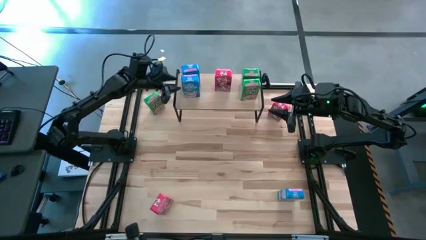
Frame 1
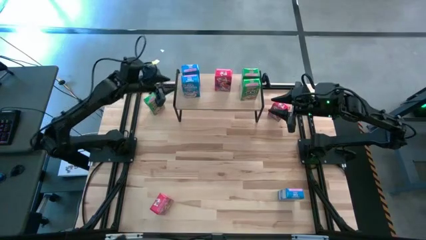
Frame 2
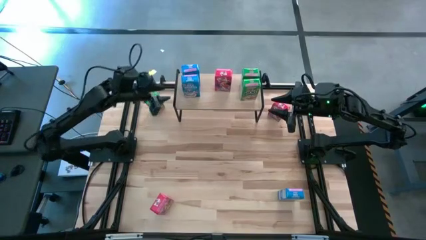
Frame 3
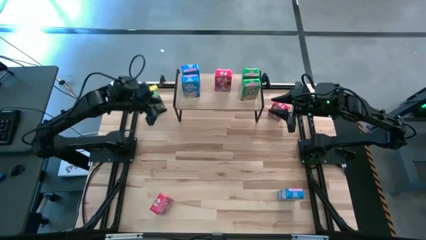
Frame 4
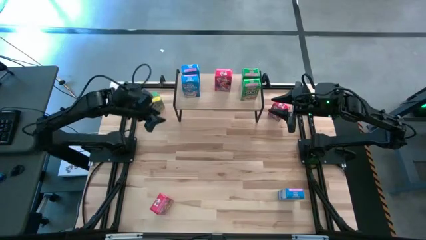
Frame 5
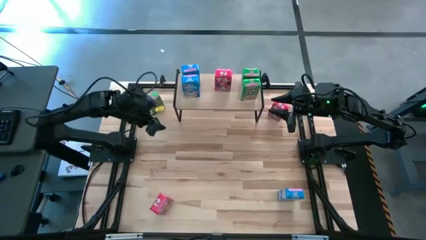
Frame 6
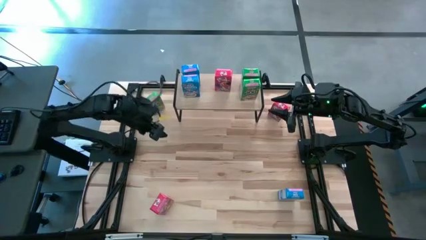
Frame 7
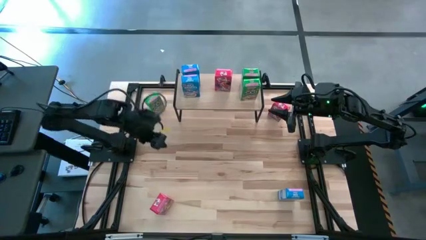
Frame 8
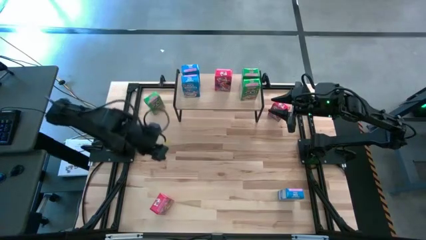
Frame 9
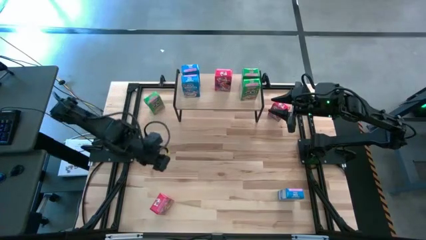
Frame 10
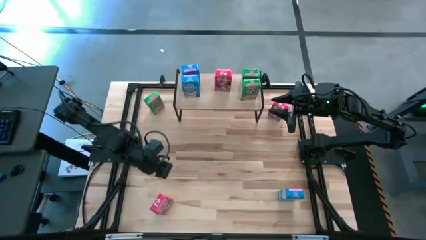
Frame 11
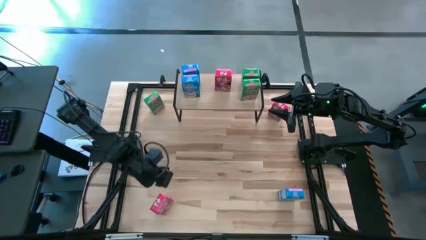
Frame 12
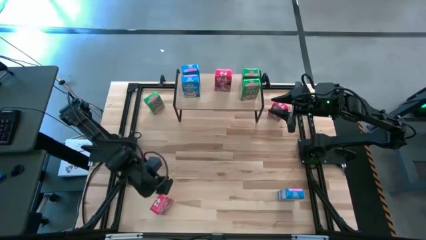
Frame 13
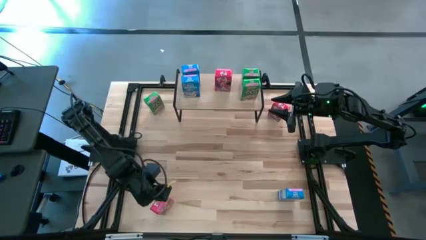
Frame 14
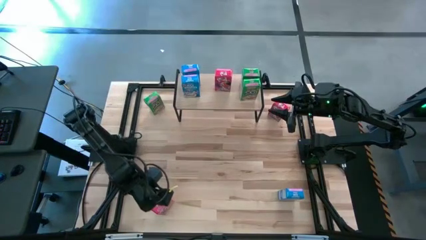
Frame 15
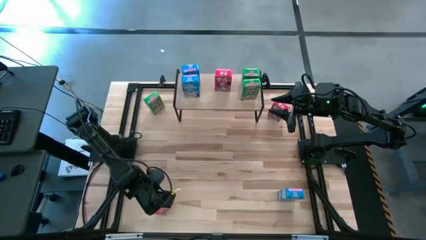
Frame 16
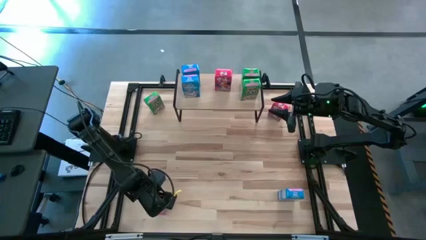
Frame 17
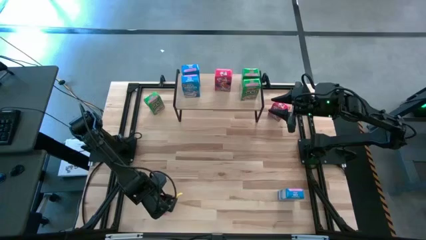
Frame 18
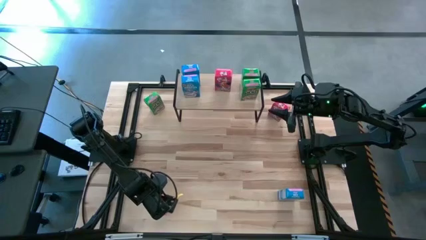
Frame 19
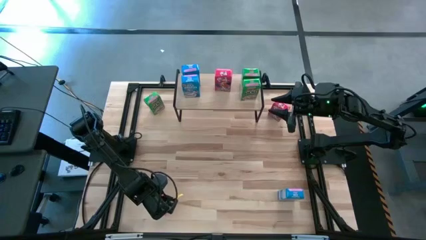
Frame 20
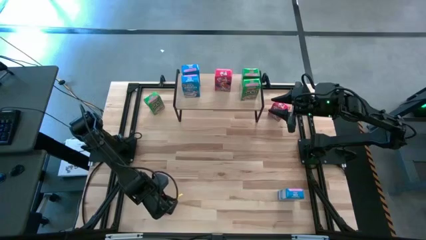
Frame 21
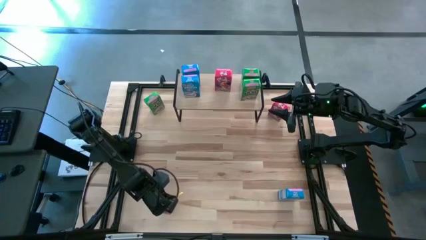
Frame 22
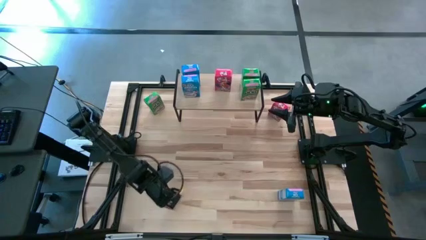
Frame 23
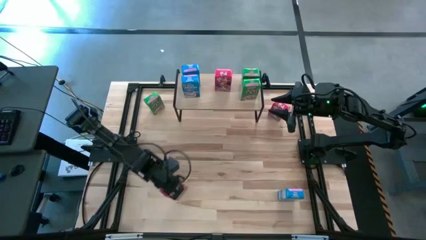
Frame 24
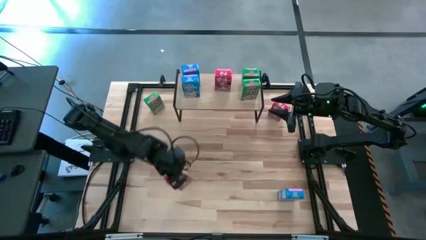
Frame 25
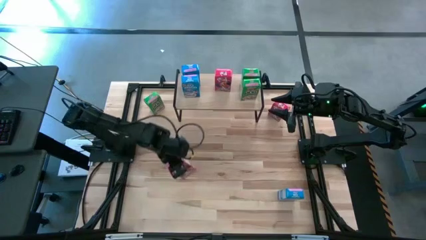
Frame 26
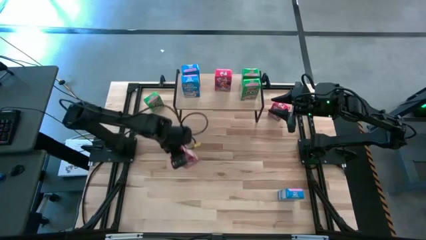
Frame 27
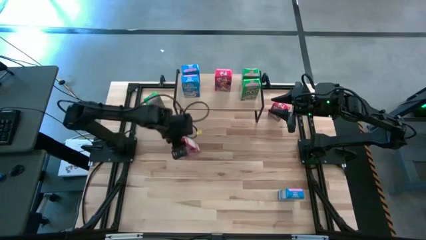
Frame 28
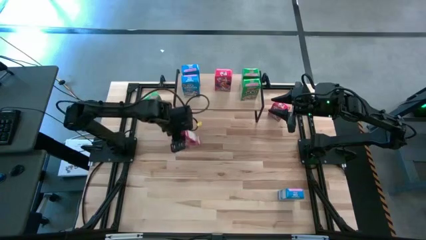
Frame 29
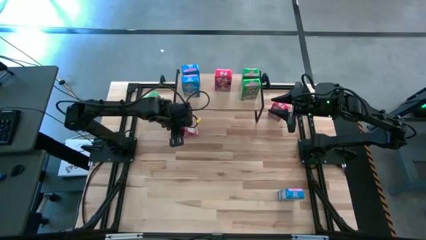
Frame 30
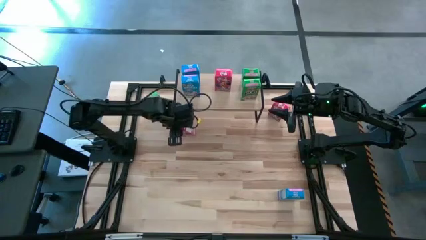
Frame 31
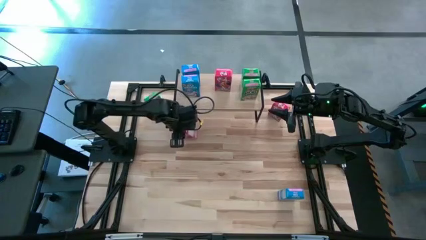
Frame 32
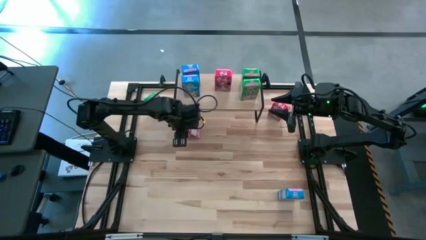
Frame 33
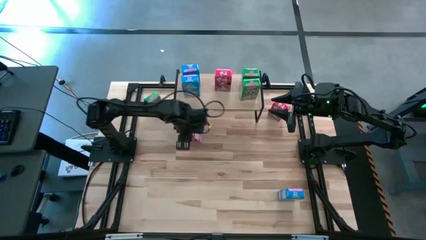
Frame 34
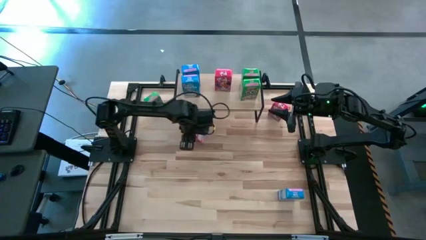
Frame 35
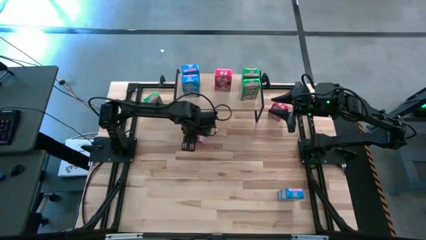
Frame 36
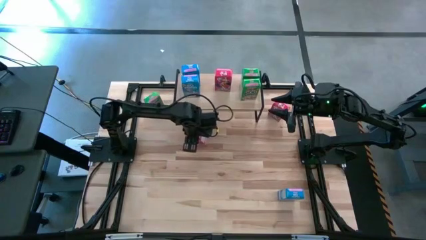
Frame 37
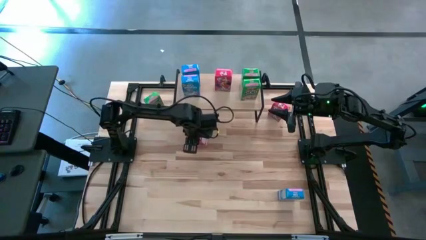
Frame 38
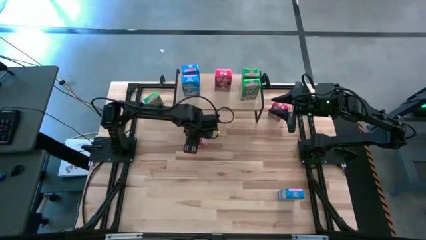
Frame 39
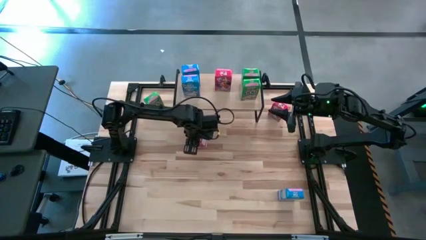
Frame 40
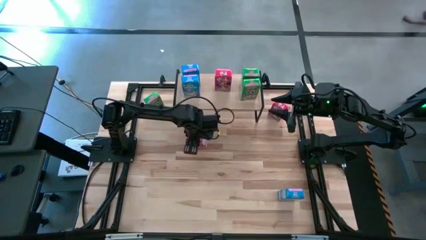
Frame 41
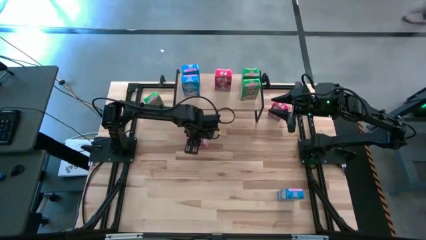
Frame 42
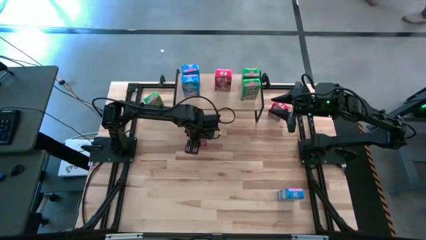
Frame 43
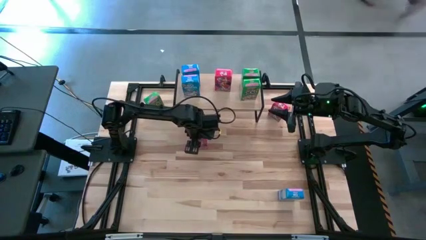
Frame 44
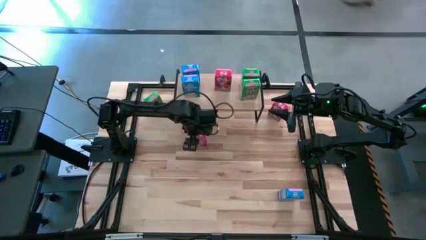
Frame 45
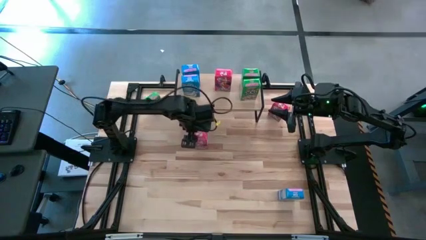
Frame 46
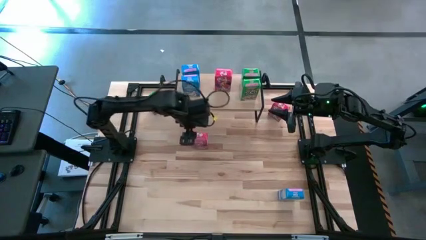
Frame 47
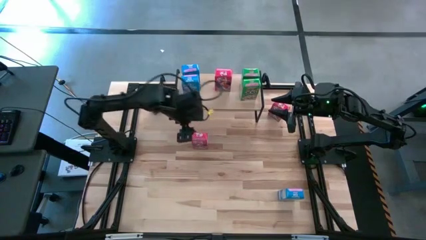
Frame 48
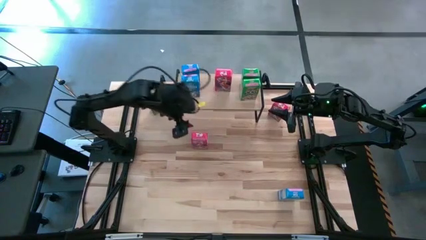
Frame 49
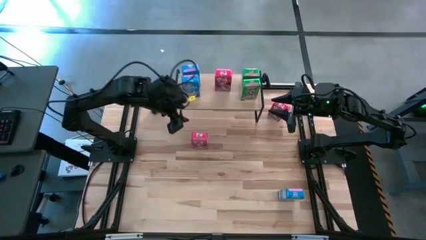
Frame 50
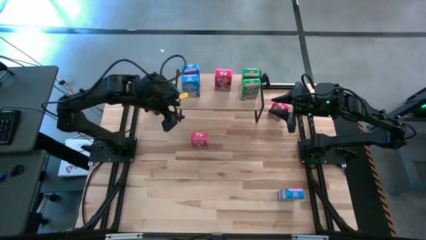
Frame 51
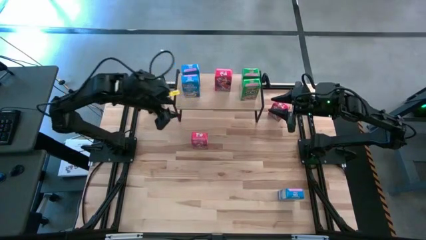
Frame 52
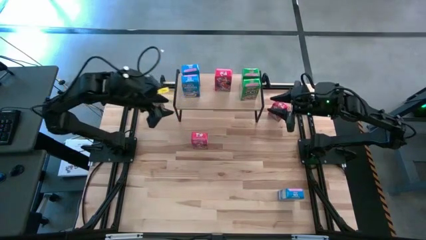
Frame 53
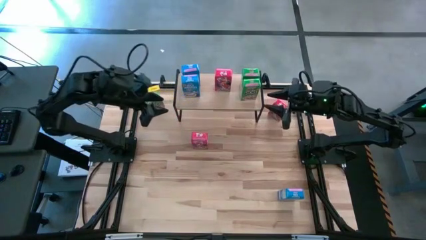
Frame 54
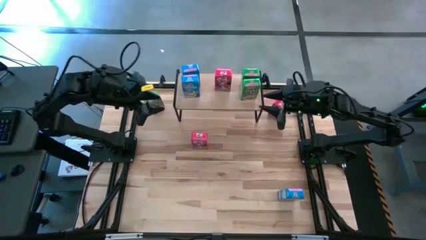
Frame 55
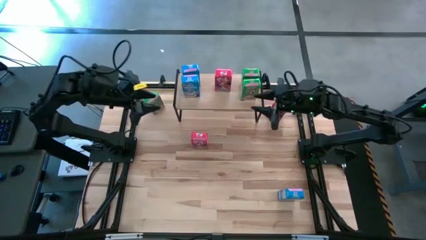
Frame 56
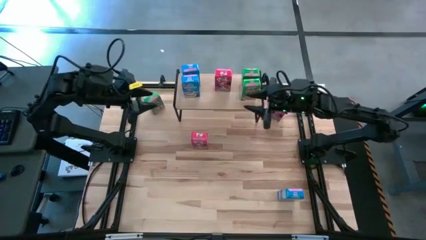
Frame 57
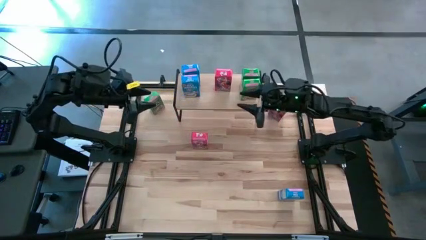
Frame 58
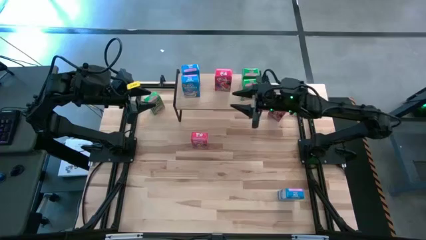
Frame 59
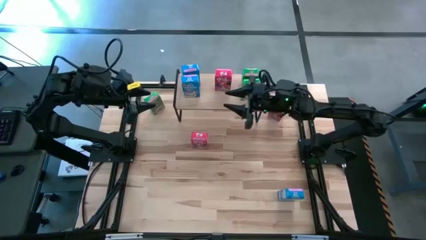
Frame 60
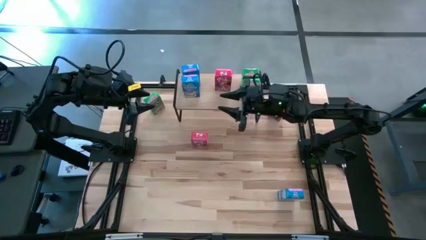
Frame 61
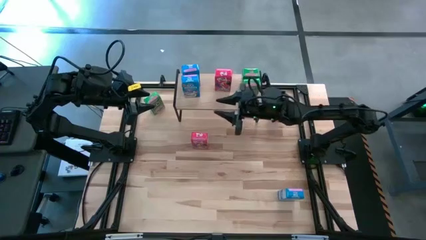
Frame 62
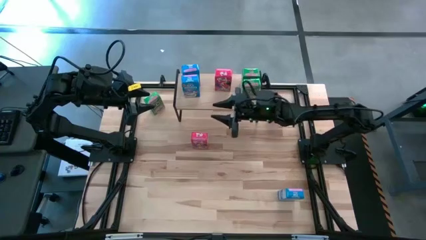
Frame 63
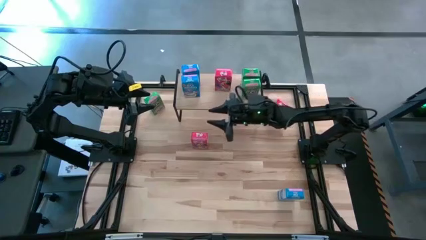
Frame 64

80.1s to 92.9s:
Task: Stack cereal on shelf
Put the bottom red cereal box on the shelf aligned with the other red cereal box

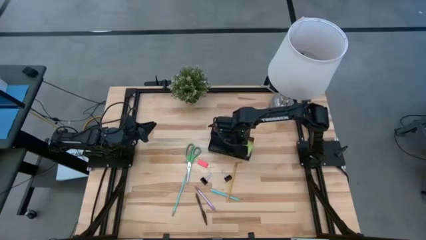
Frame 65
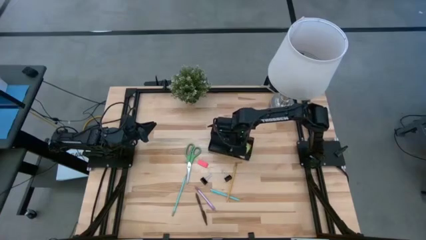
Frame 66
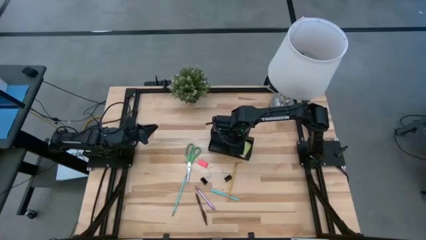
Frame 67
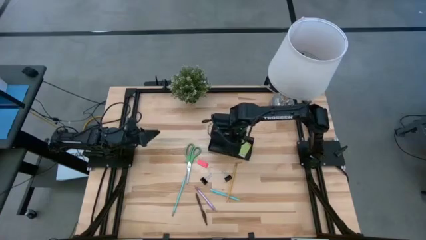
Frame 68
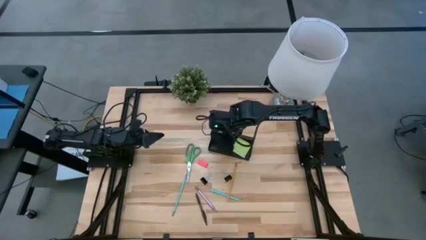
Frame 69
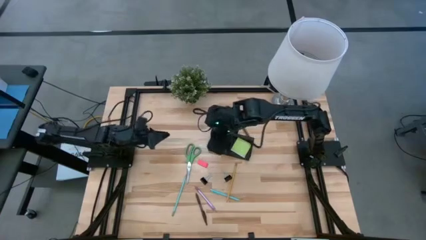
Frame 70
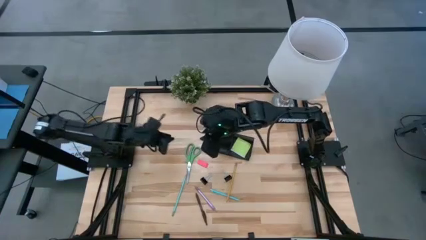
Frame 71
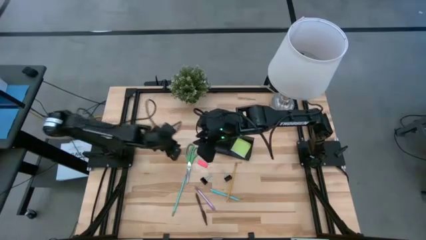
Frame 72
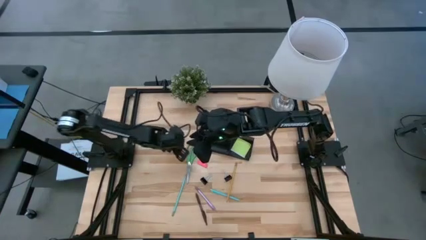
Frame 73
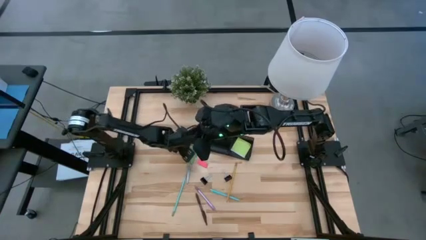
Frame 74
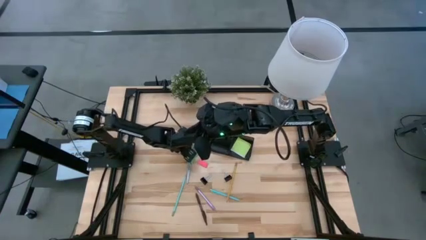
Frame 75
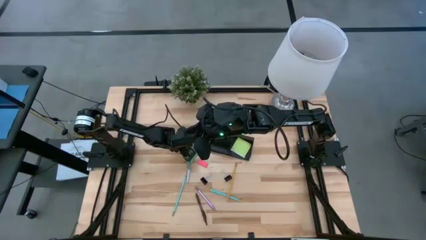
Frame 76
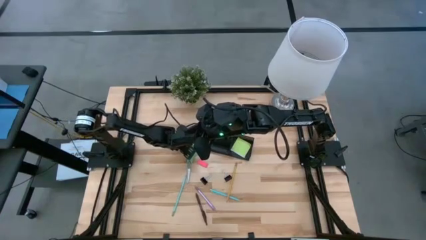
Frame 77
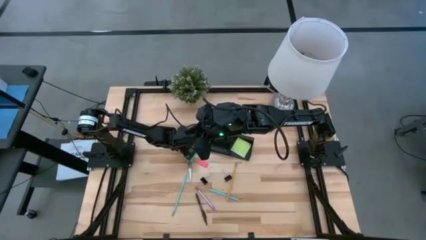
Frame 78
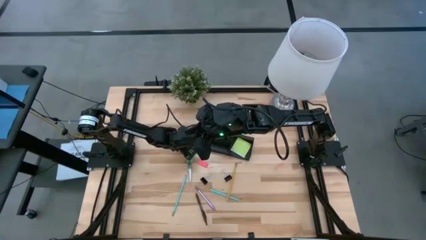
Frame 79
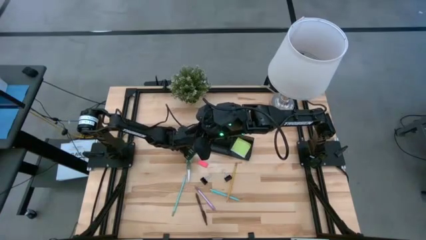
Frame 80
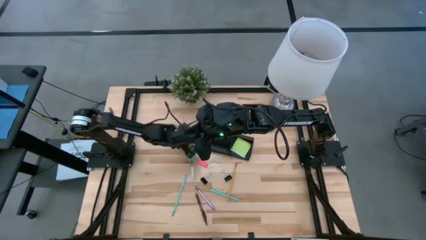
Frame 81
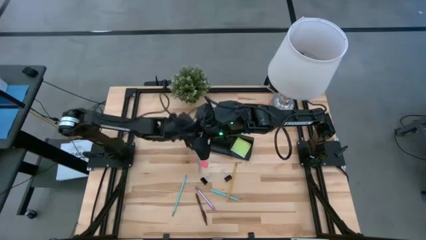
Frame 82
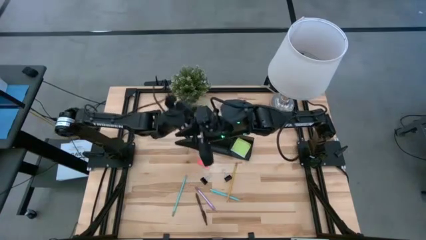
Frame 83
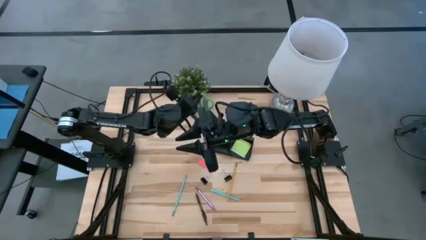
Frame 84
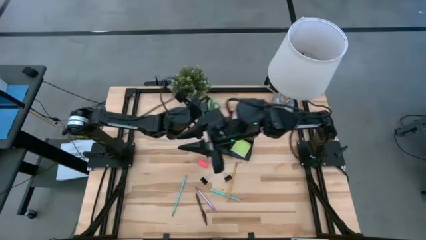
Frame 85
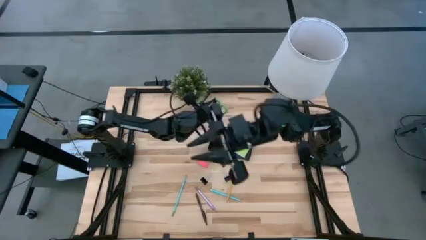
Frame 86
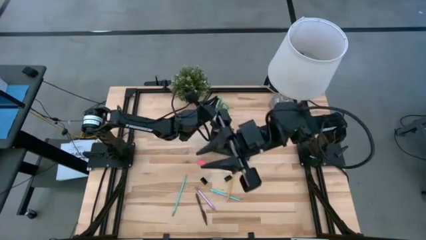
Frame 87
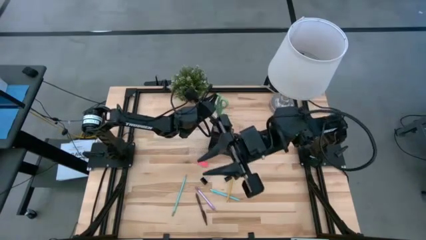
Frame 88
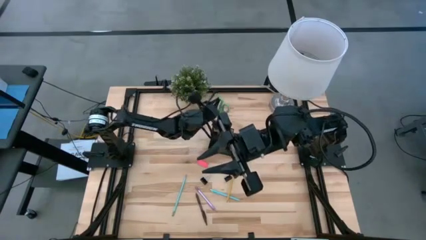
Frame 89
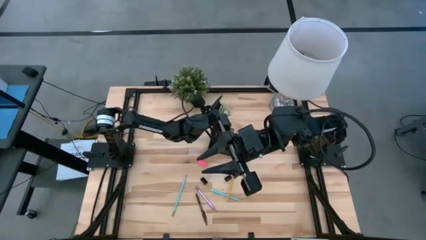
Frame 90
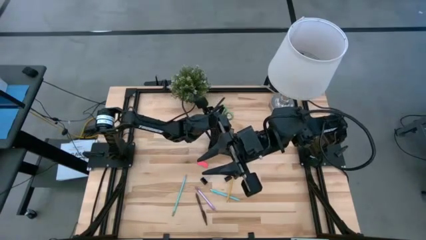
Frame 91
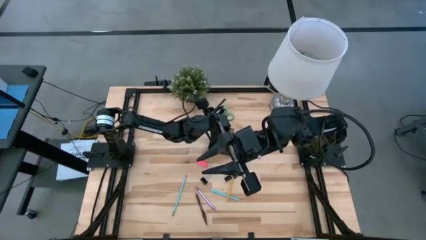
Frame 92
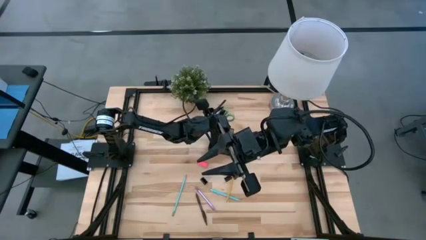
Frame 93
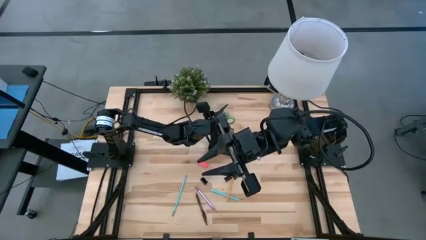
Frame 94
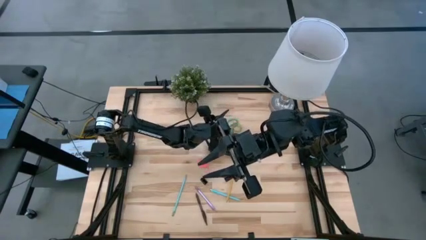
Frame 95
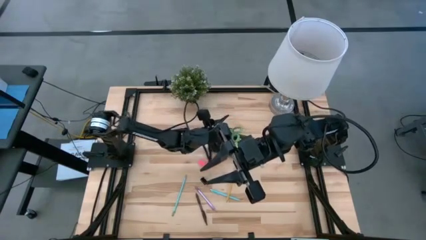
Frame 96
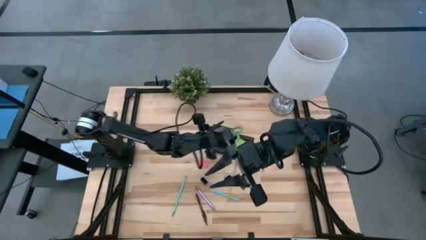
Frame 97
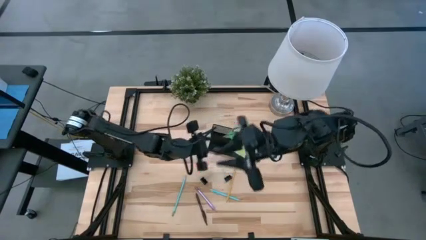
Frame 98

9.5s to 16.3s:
Task: Pick and place office supplies into organizer
Put the green scissors on the black desk organizer
